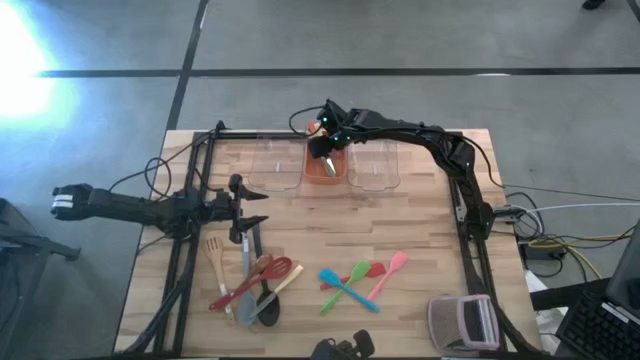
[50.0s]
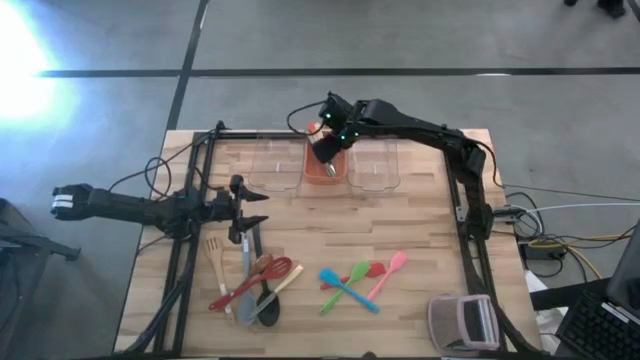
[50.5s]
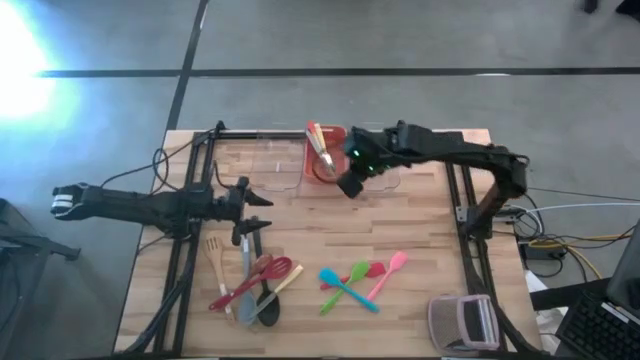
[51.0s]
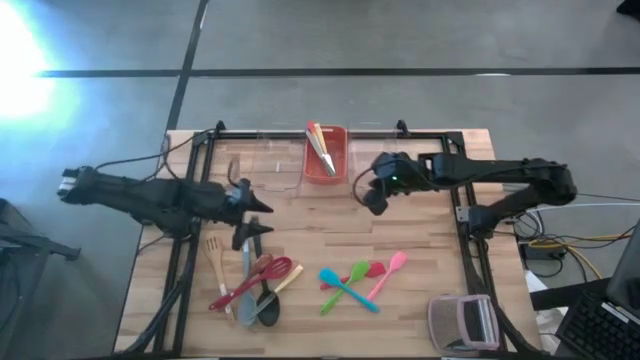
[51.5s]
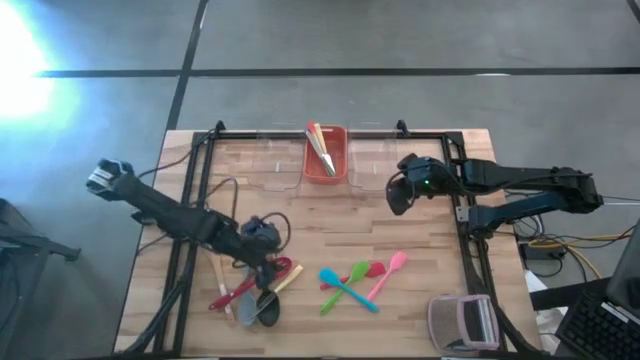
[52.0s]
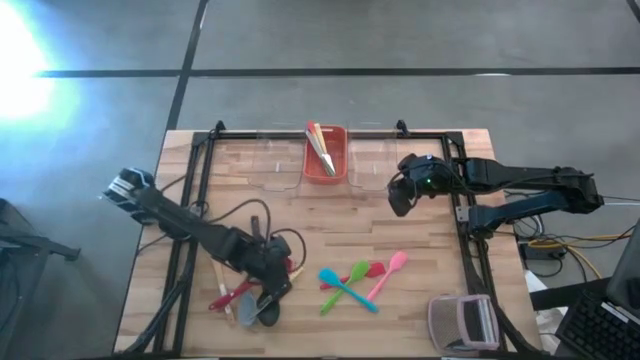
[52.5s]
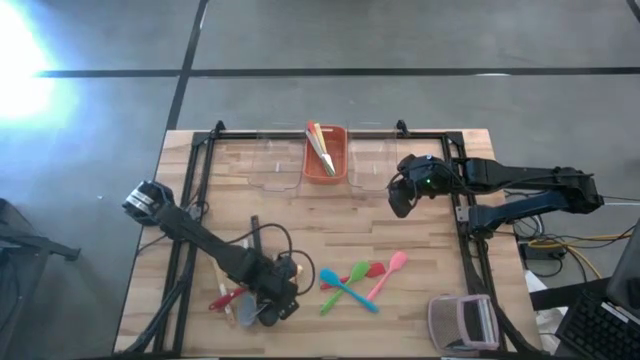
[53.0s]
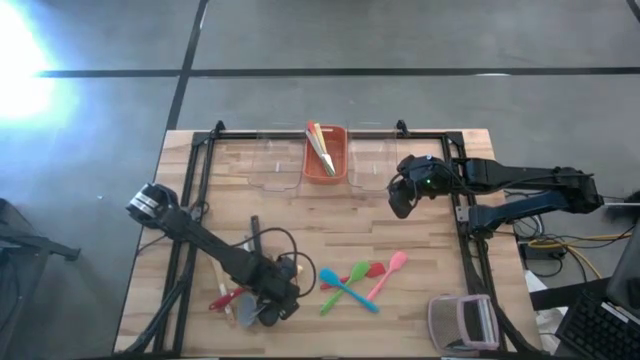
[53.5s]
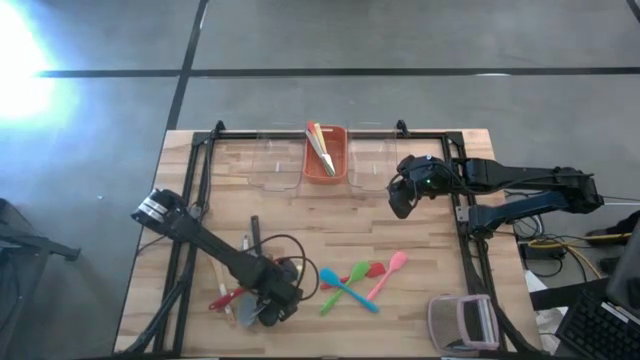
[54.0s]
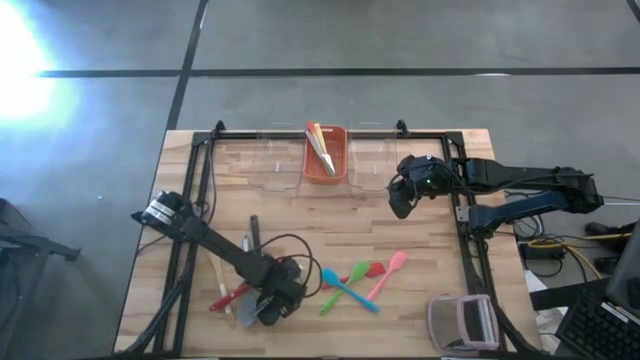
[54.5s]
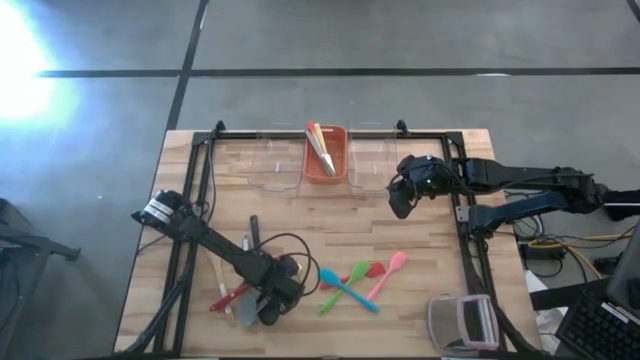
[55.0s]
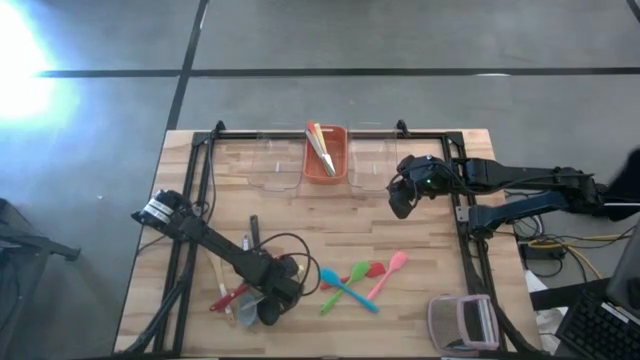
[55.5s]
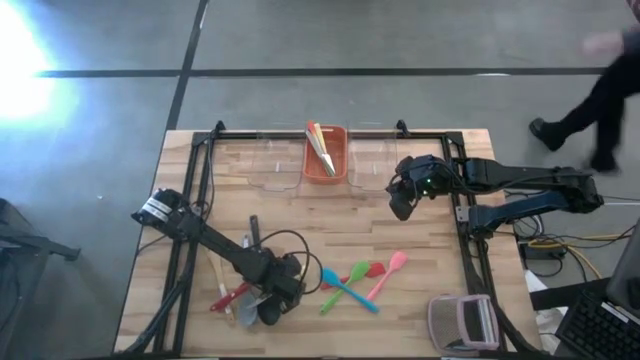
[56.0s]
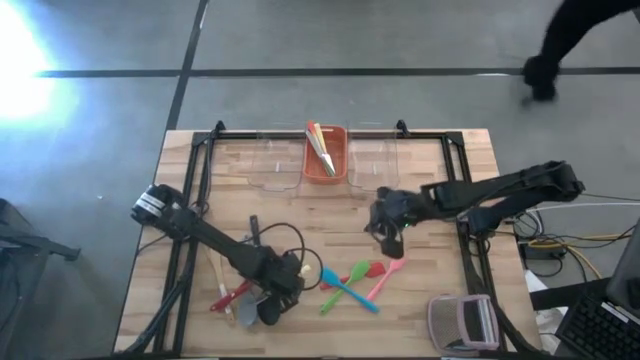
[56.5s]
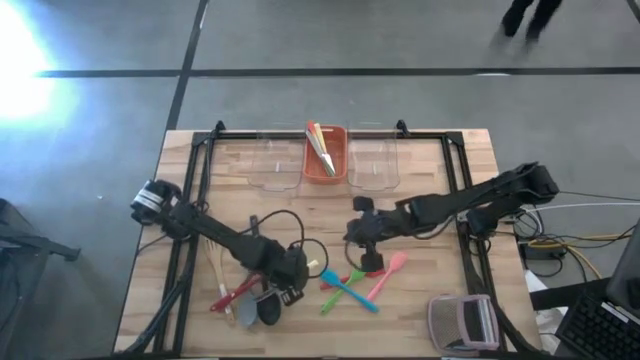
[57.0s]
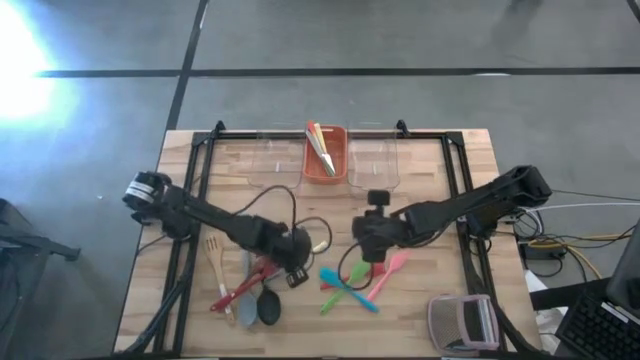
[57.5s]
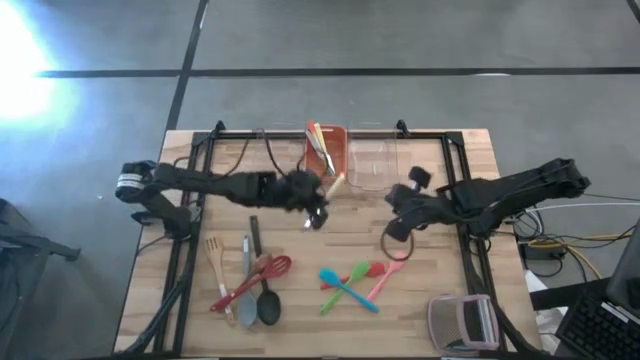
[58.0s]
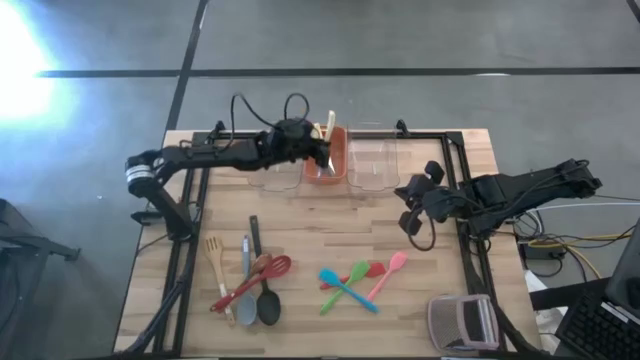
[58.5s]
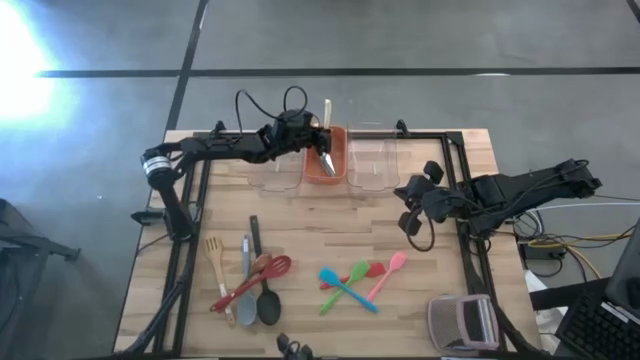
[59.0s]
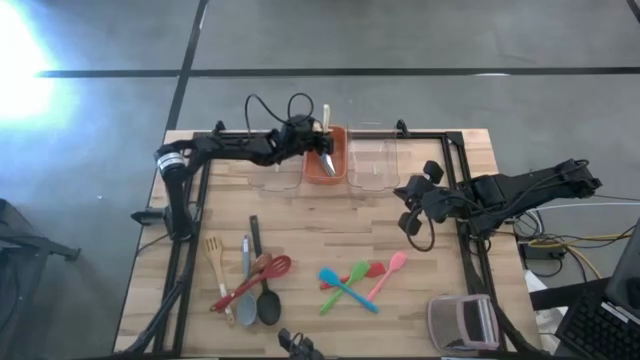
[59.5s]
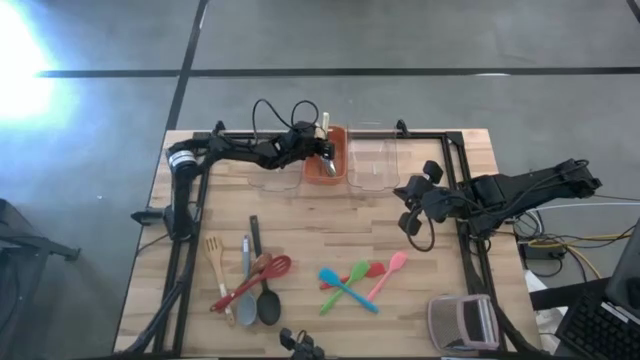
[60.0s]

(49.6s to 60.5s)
Task: Pick & Place Kitchen Items
Put the yellow table knife into the orange bin

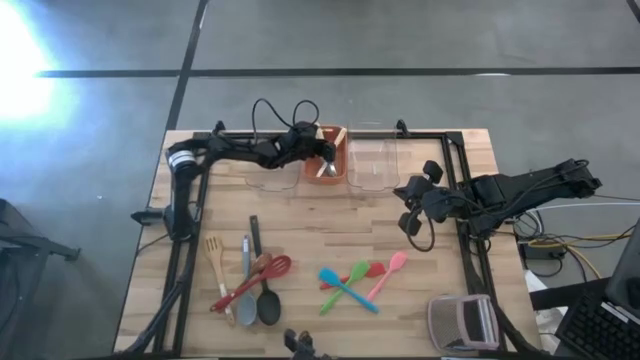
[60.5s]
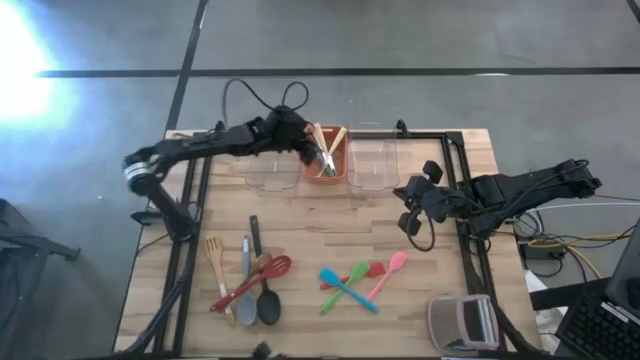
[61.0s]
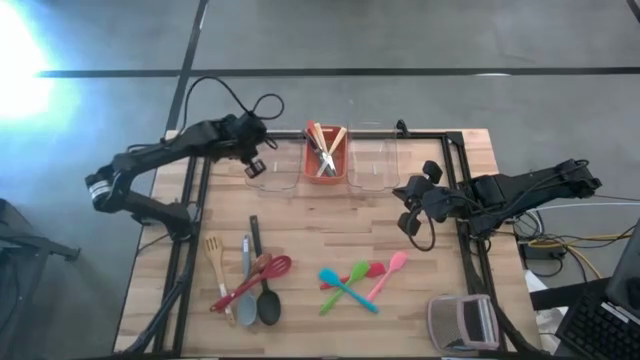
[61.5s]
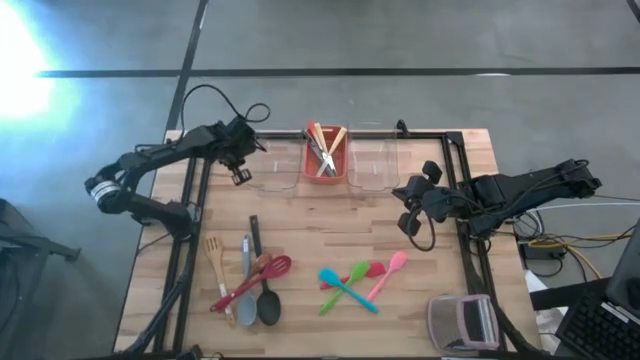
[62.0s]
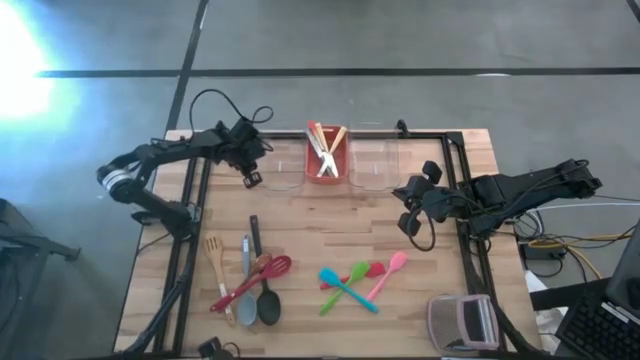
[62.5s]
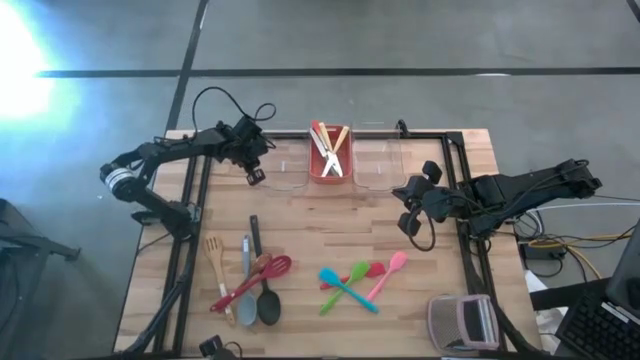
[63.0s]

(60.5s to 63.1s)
Adjust the left transparent bin

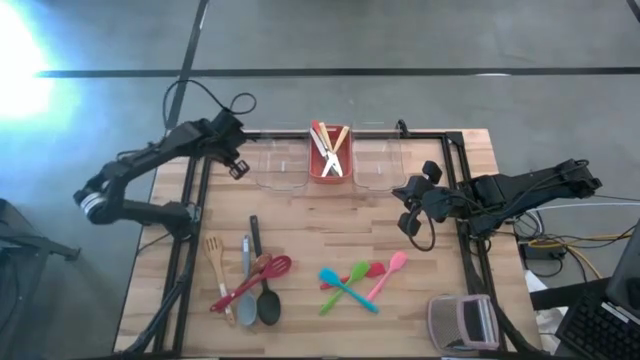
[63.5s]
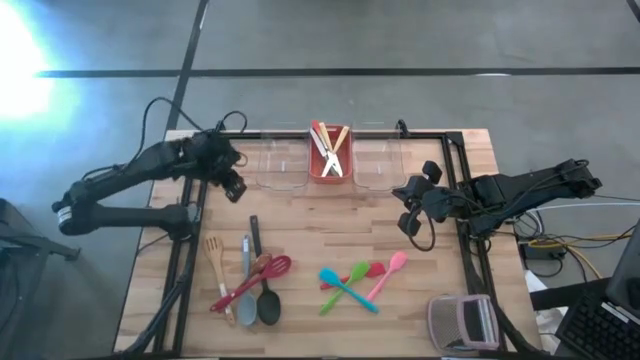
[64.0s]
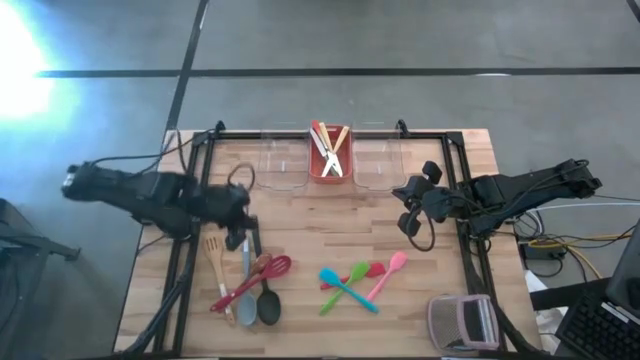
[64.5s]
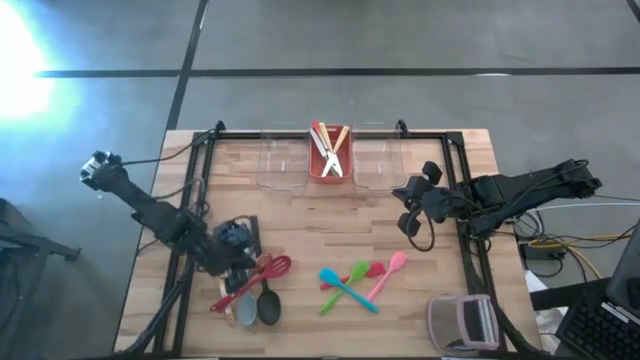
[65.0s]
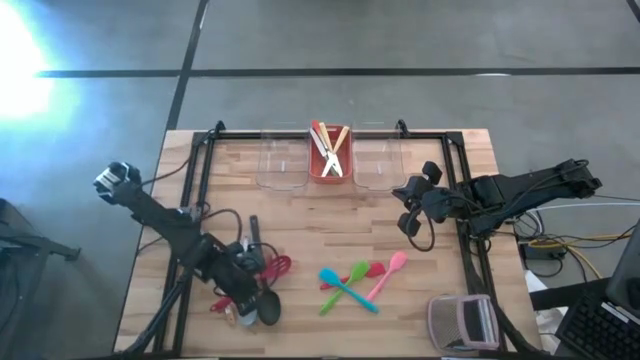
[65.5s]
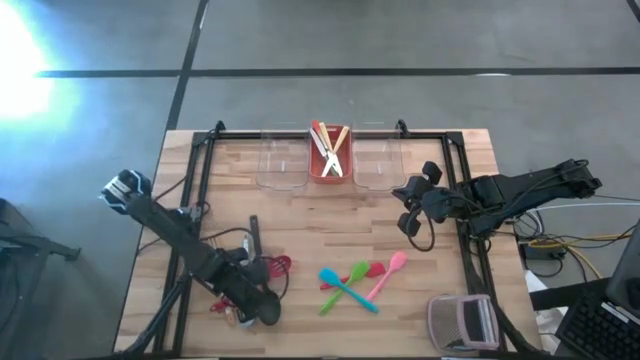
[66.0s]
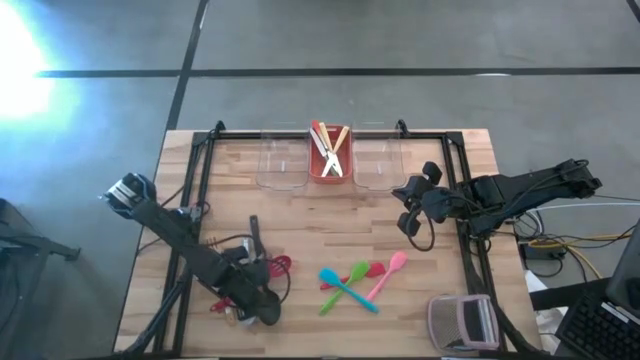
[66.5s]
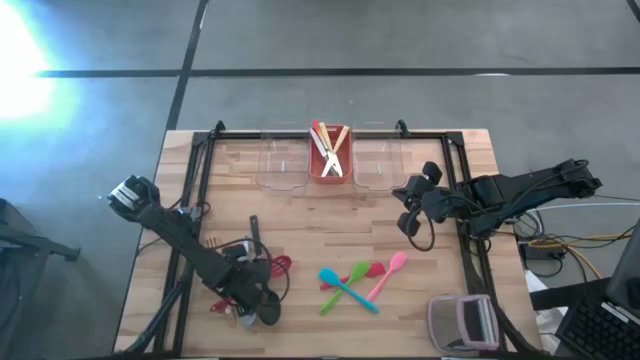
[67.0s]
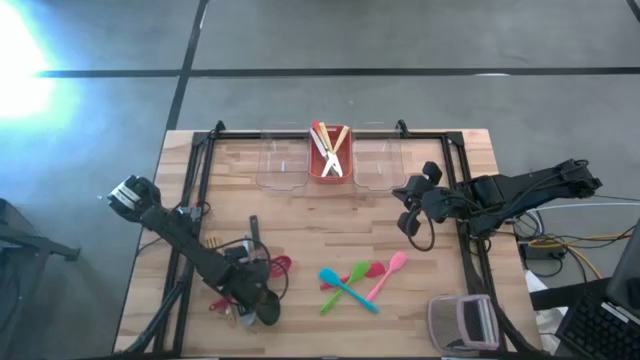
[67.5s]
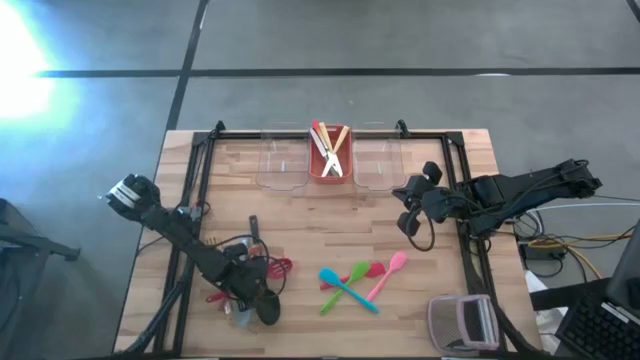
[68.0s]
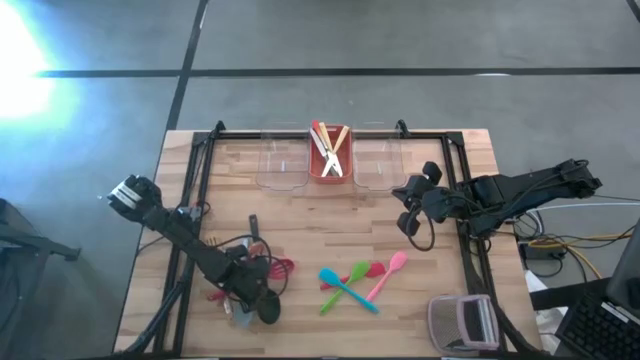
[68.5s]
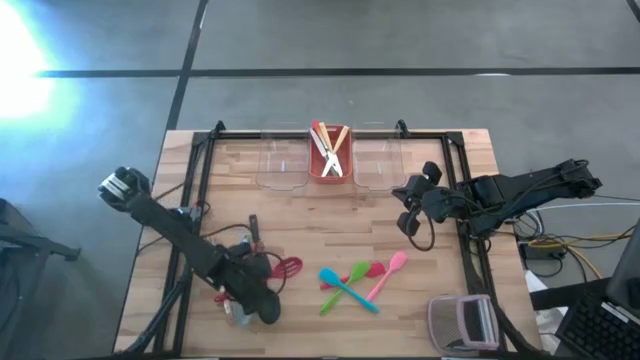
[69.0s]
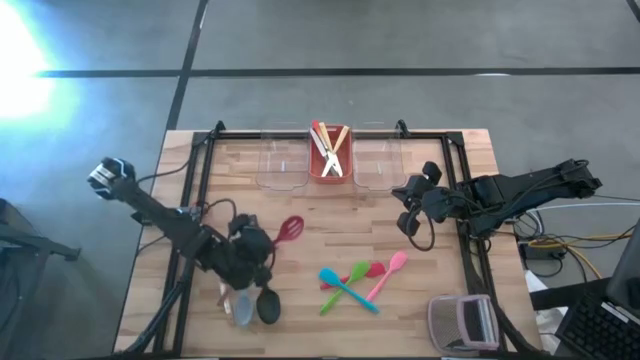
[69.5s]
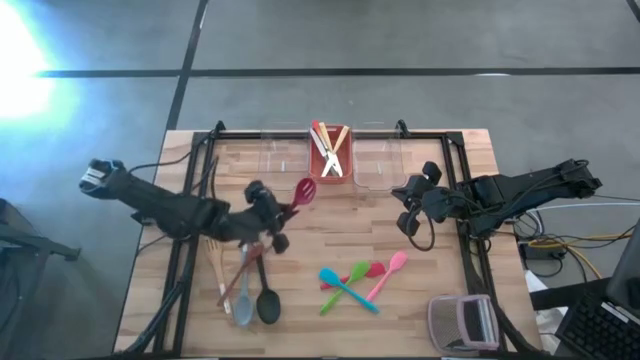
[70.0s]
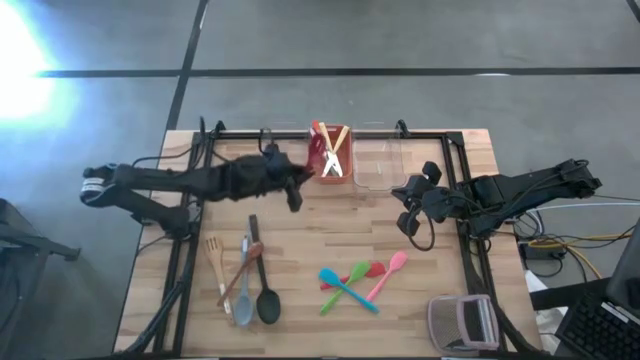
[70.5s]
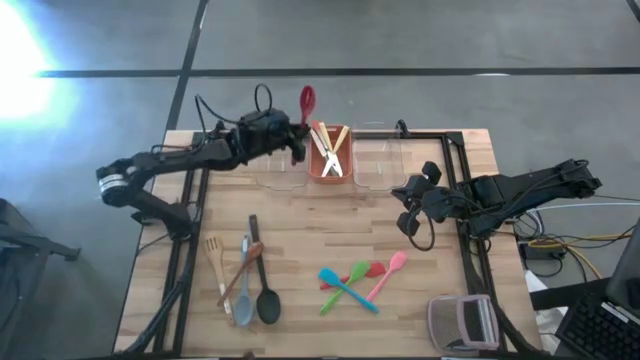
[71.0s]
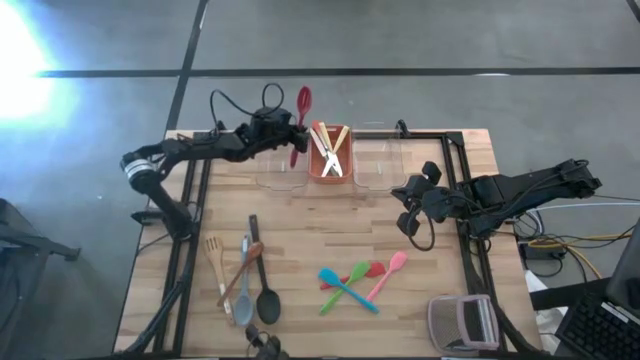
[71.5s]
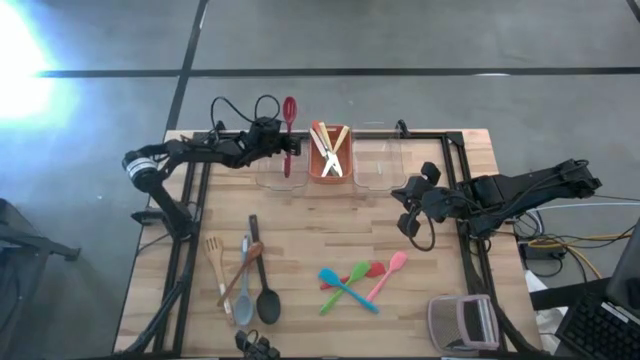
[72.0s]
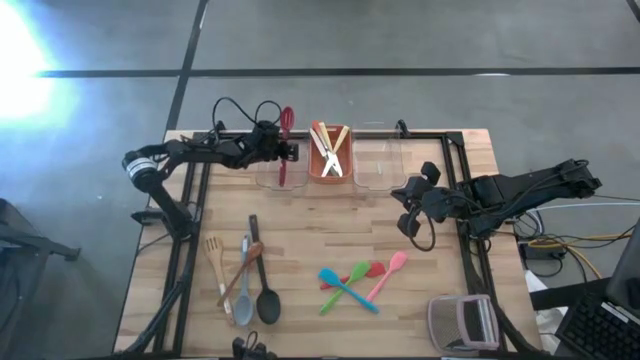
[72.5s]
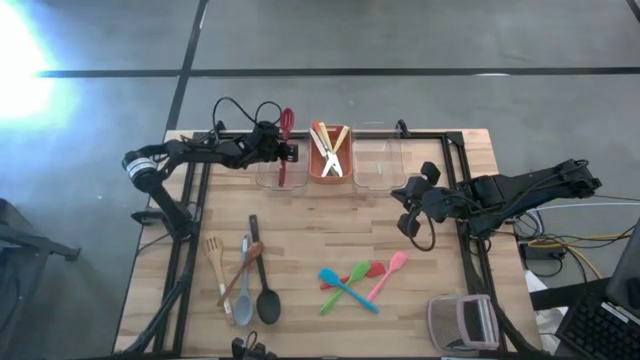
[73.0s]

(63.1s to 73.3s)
Put the red serving spoon into the left transparent bin
